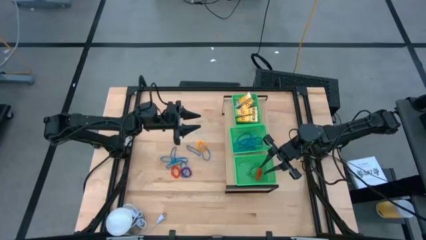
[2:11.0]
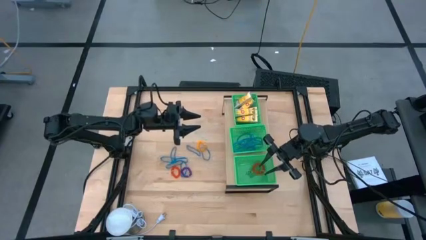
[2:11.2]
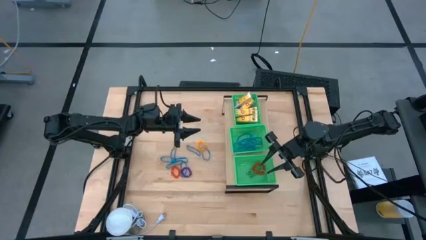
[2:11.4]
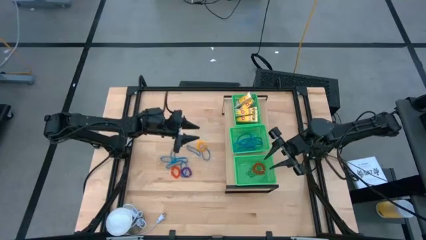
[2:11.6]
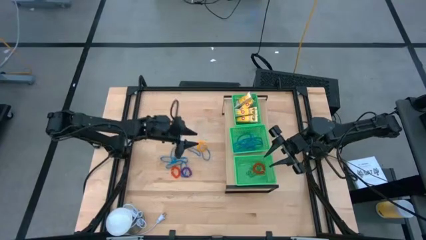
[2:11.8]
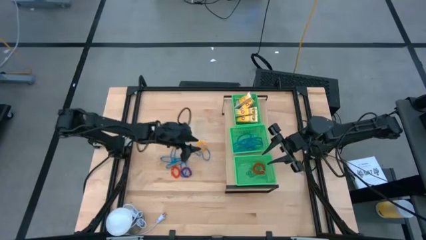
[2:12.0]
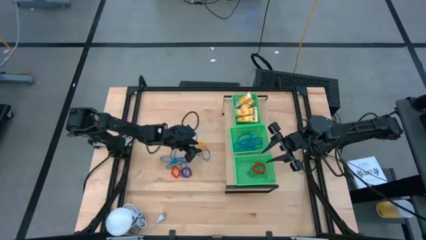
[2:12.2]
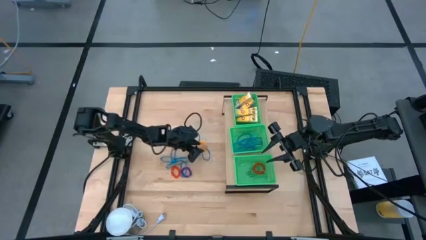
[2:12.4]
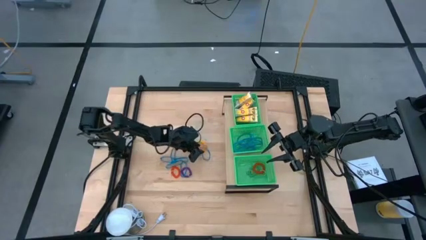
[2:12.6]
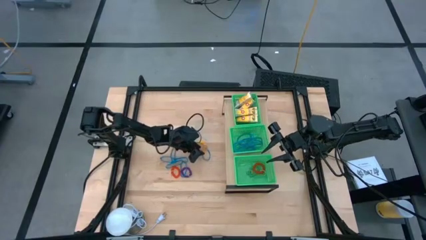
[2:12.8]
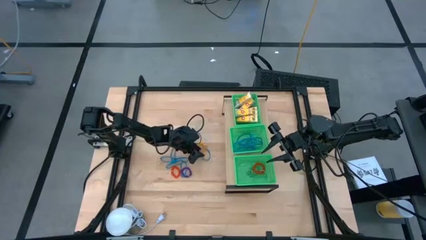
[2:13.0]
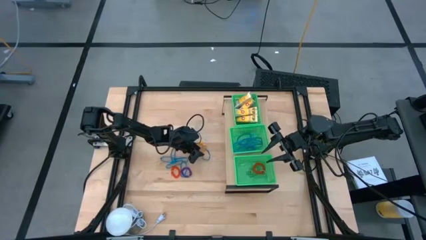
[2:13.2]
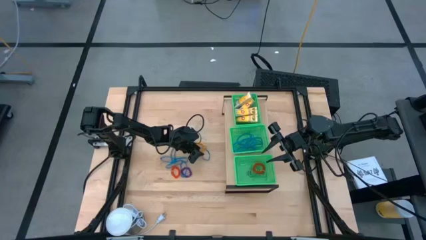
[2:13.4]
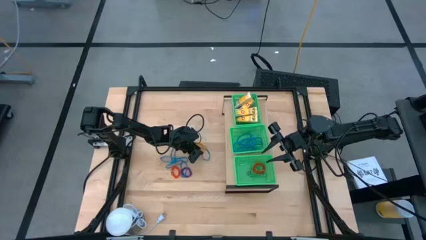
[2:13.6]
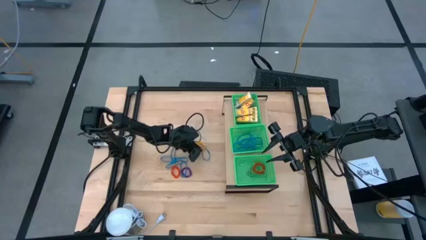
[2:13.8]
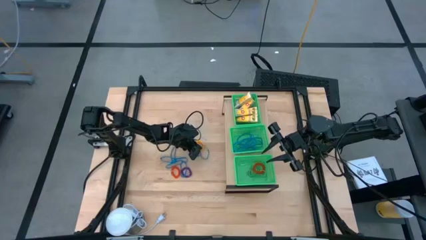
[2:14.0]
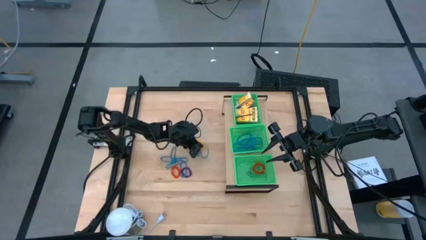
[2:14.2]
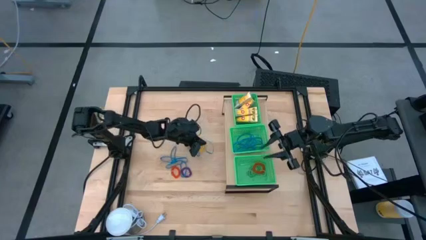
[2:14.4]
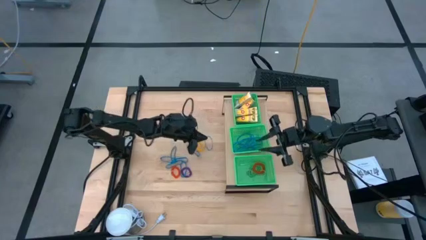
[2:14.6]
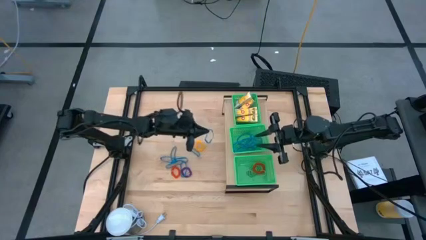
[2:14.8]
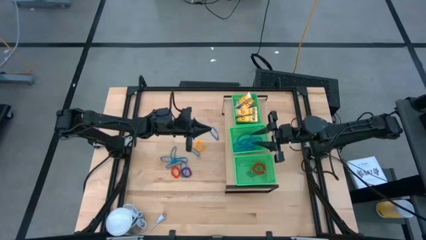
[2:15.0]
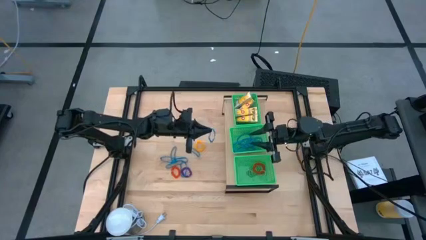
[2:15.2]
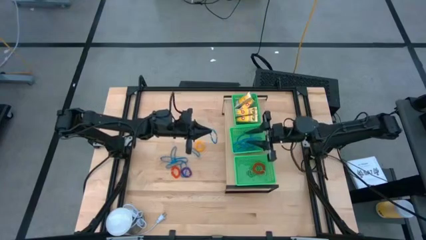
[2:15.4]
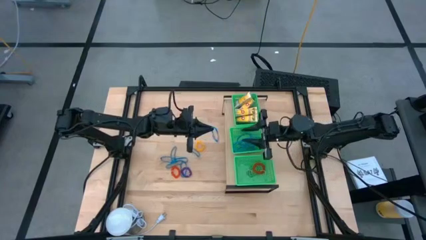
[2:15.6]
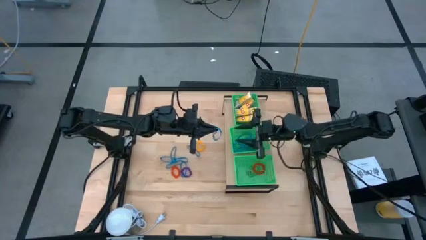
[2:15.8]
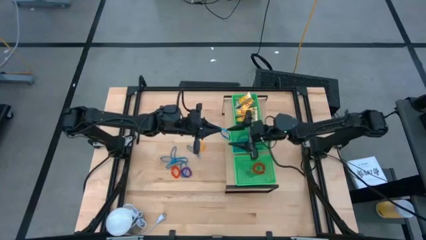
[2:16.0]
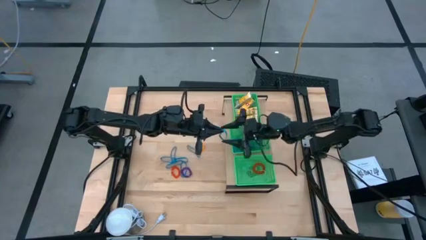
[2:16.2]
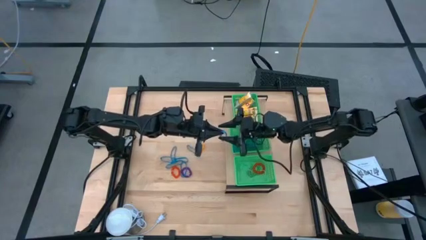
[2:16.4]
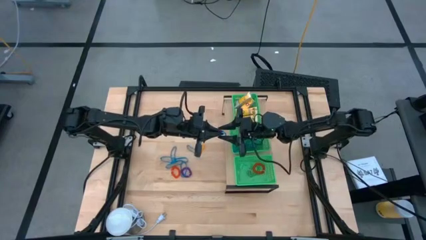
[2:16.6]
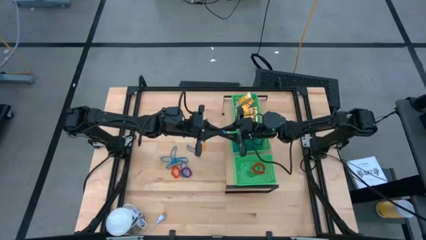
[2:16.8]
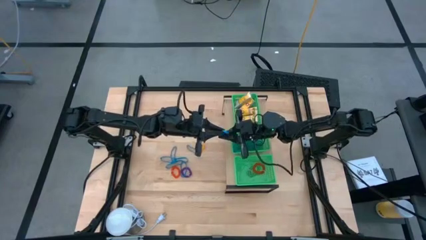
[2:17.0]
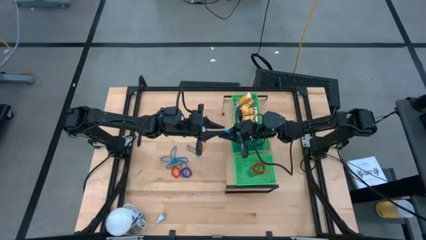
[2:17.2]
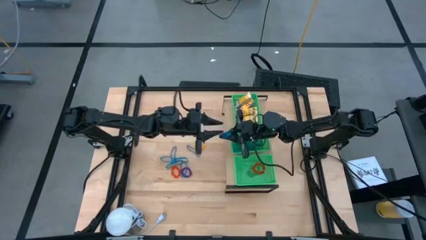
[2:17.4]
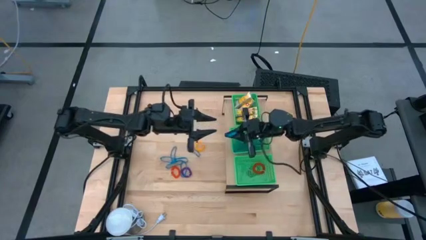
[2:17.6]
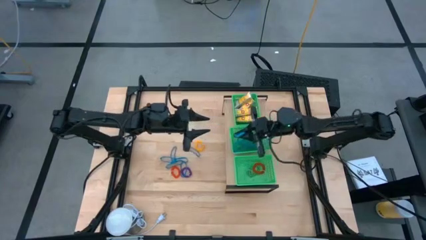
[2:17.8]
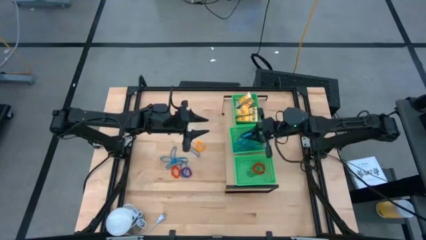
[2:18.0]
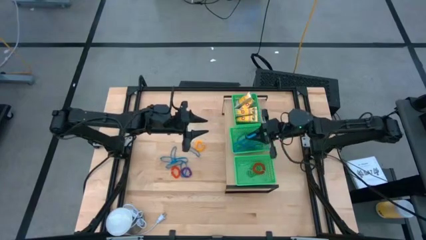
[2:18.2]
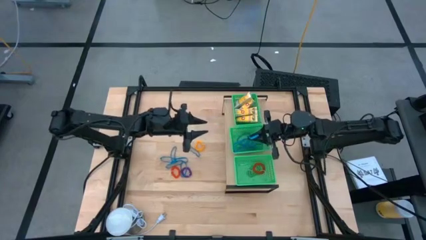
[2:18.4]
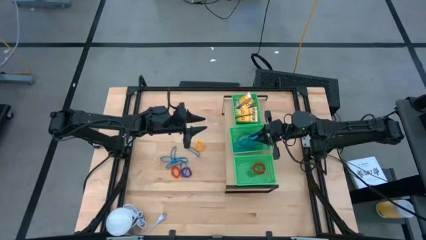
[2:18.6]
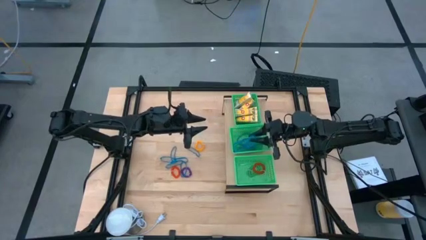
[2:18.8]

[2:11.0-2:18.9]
Task: Pick & Place Office Desk Supplies
Put the blue rubber band into the middle green bin

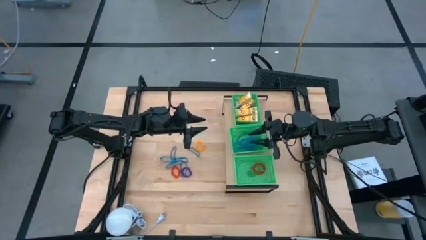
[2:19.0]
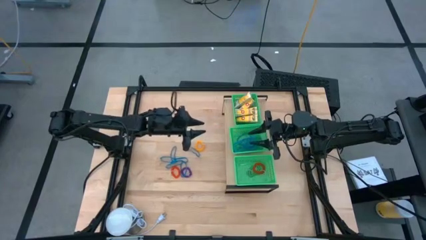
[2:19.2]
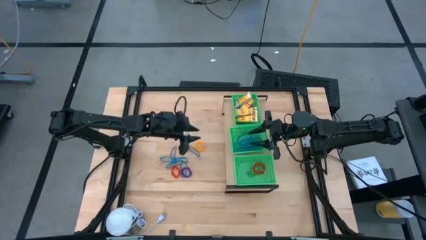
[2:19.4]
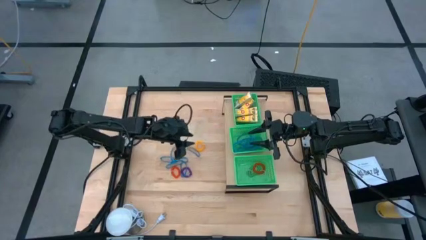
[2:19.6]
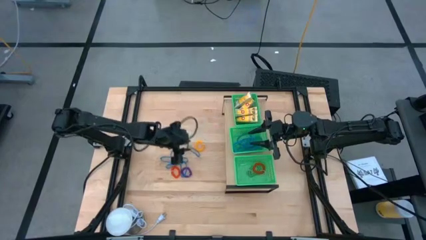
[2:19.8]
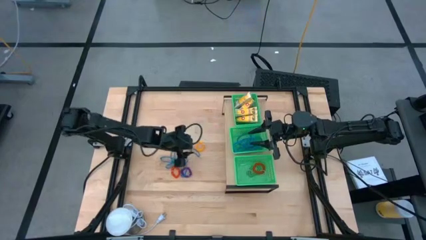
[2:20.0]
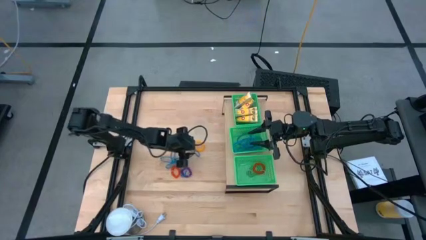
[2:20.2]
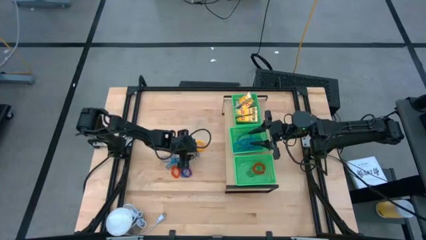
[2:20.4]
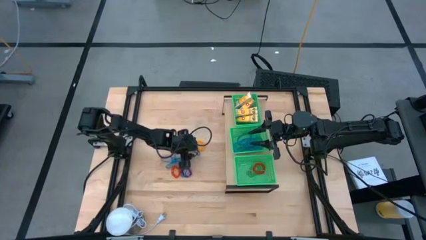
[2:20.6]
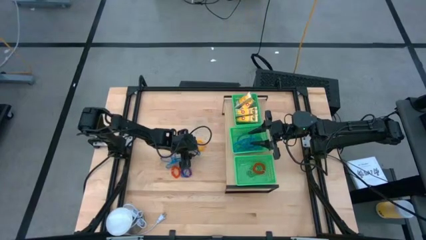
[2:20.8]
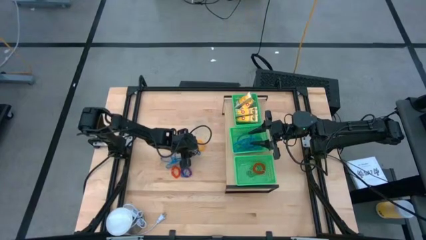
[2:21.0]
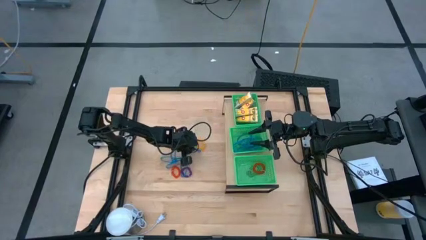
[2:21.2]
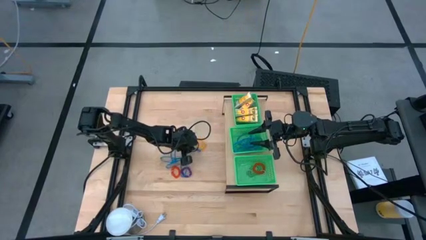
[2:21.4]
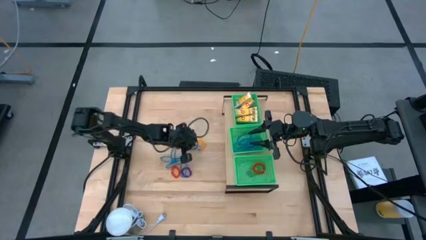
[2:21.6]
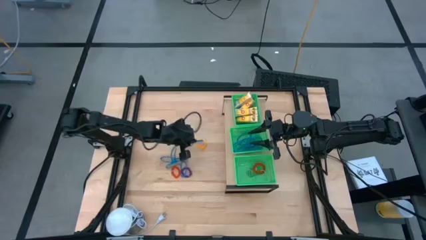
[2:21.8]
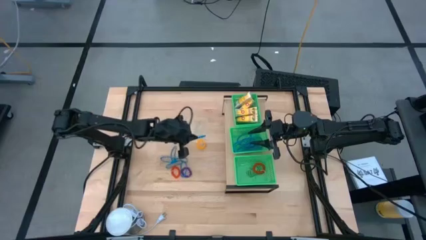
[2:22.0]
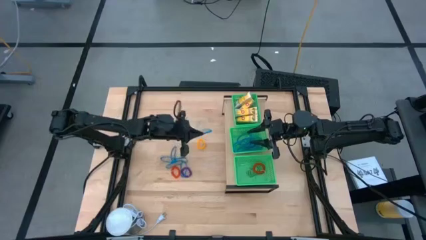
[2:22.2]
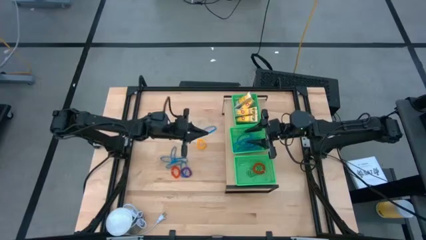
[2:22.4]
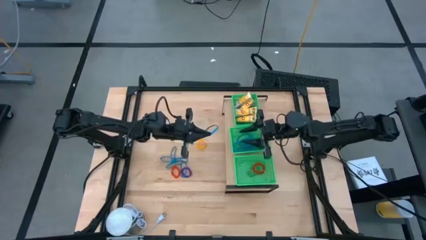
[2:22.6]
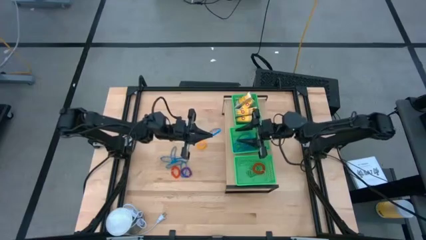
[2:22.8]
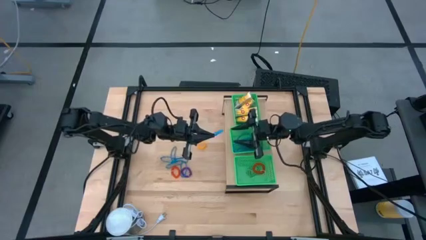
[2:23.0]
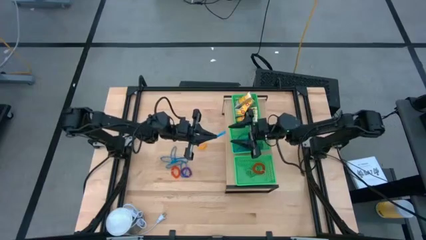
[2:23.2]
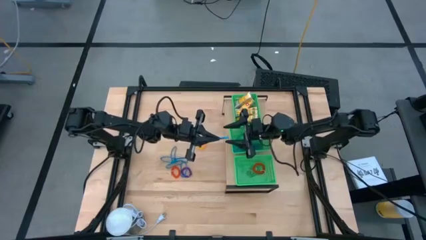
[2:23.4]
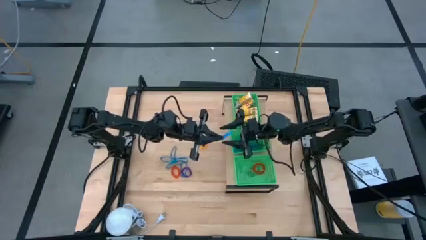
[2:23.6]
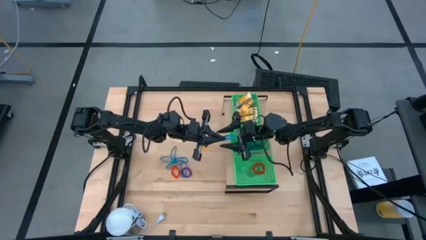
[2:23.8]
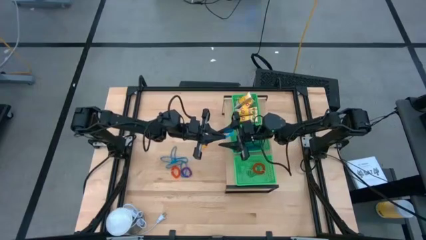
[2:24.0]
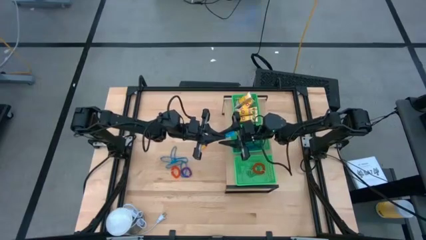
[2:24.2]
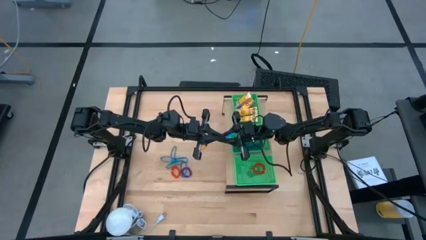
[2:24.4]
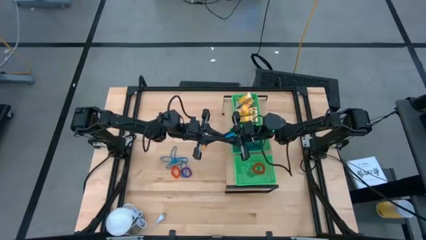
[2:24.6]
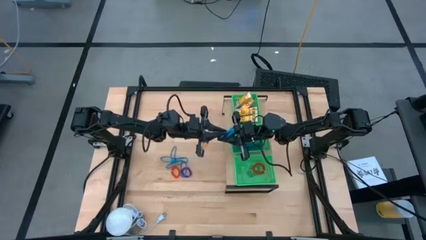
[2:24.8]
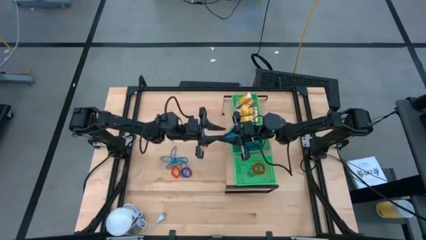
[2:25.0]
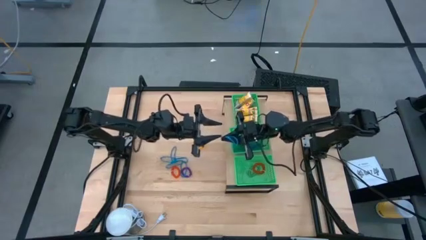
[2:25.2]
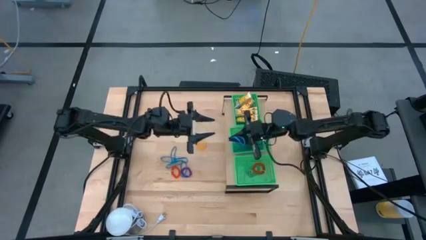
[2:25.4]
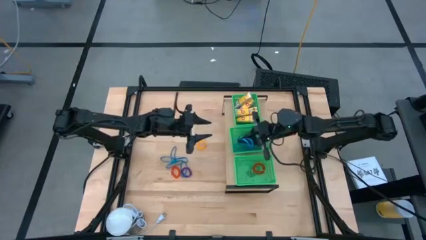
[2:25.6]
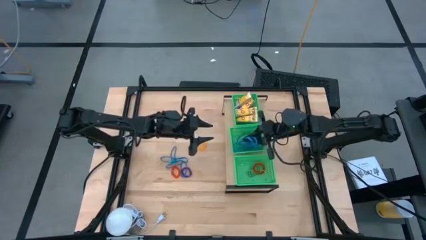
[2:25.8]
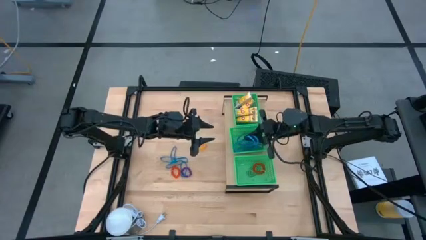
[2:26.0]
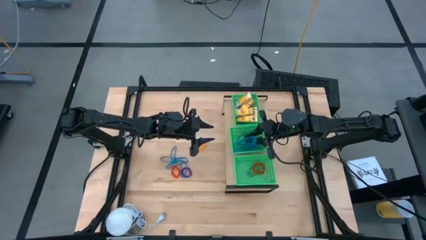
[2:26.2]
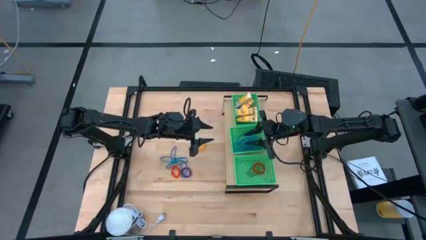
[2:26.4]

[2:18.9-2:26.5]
Put the blue rubber band into the middle green bin
